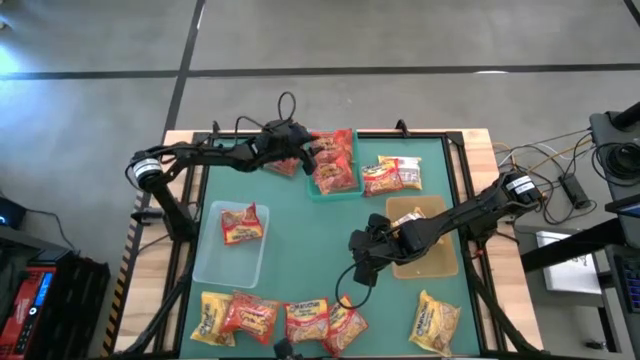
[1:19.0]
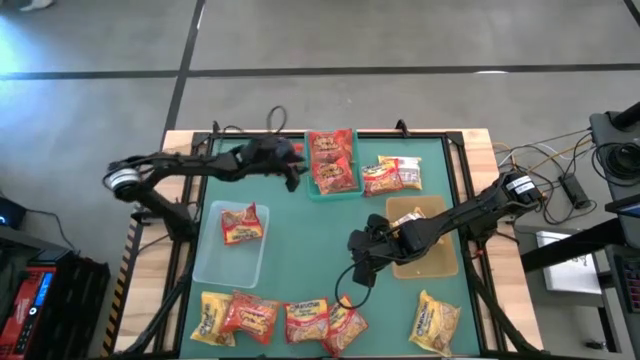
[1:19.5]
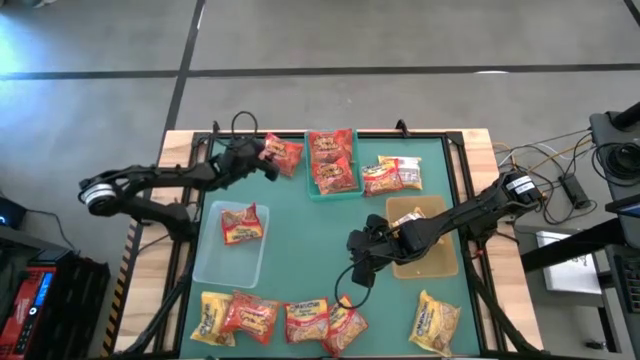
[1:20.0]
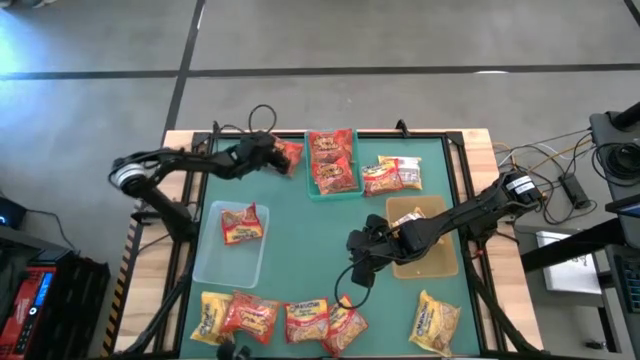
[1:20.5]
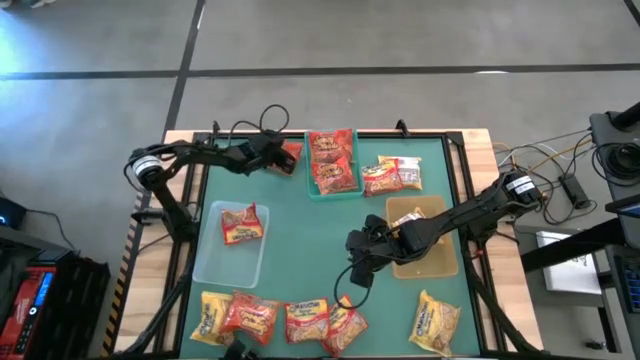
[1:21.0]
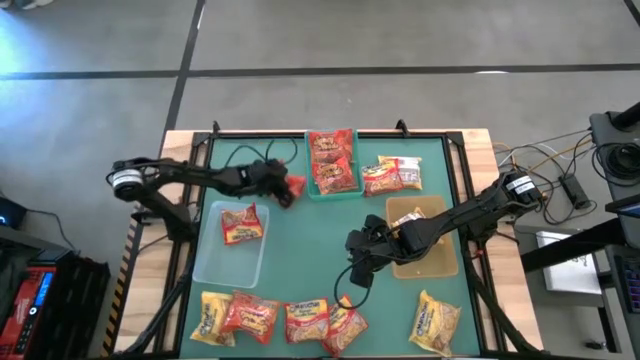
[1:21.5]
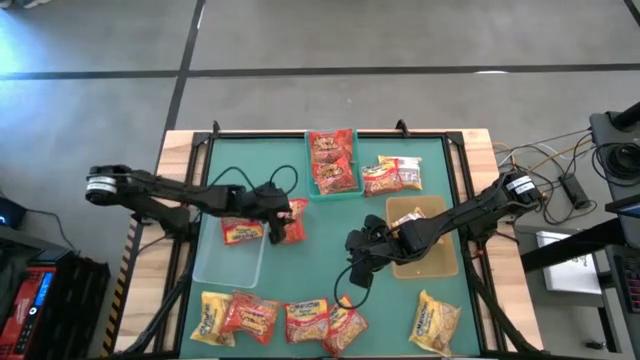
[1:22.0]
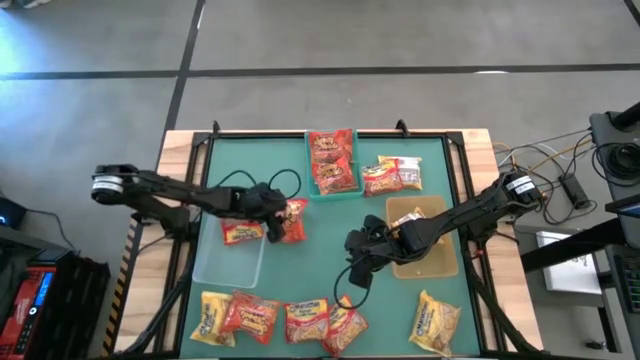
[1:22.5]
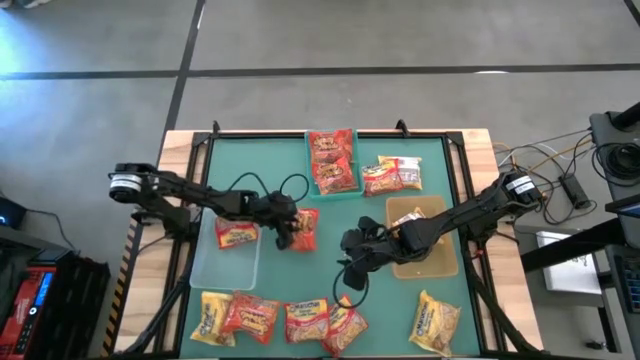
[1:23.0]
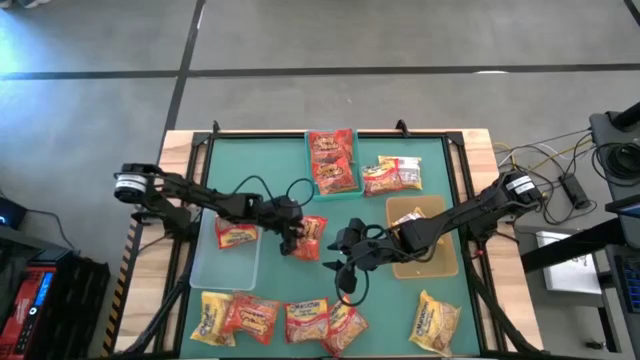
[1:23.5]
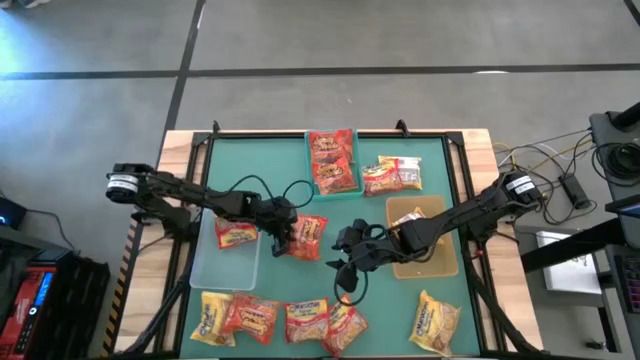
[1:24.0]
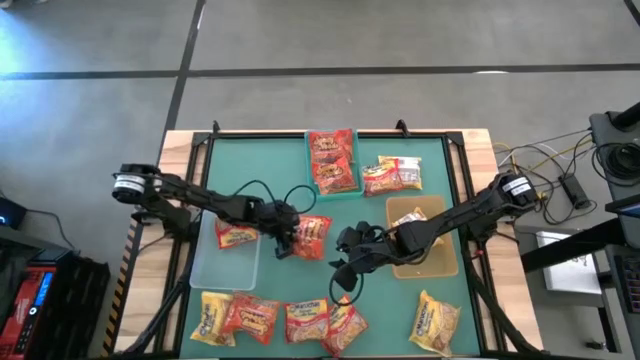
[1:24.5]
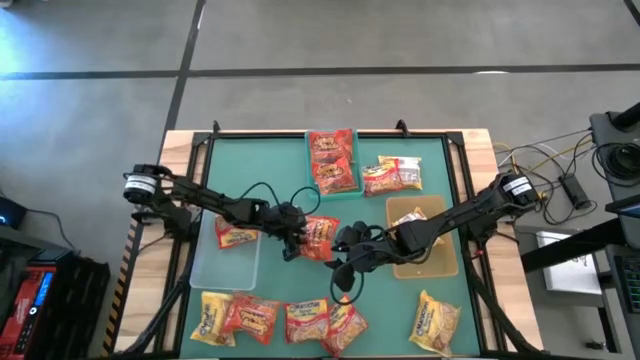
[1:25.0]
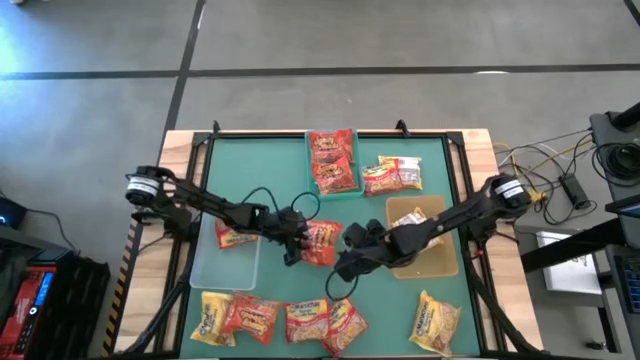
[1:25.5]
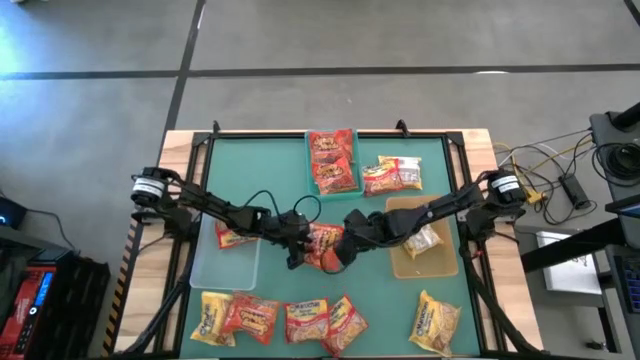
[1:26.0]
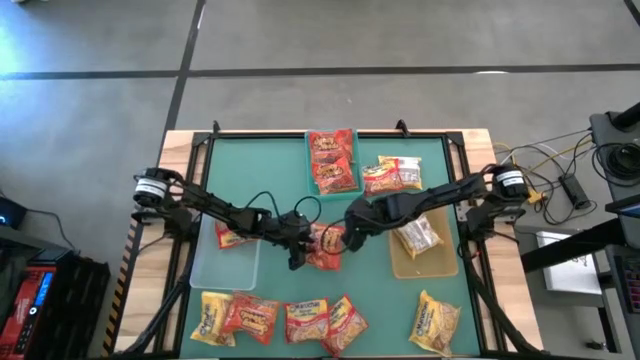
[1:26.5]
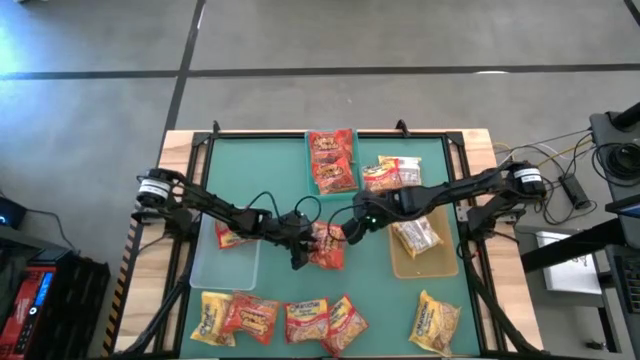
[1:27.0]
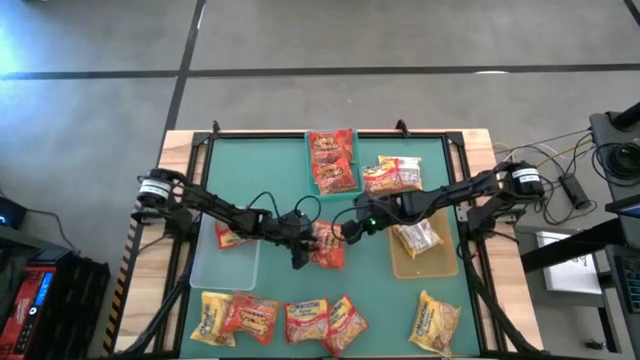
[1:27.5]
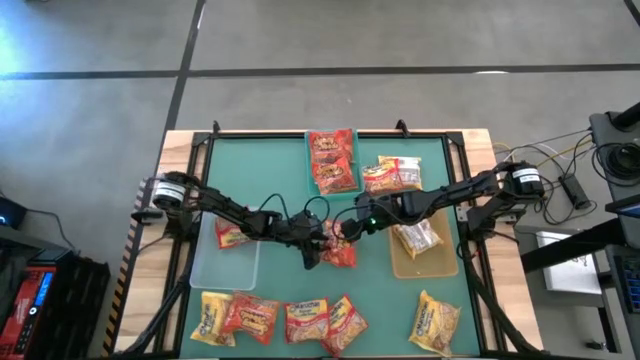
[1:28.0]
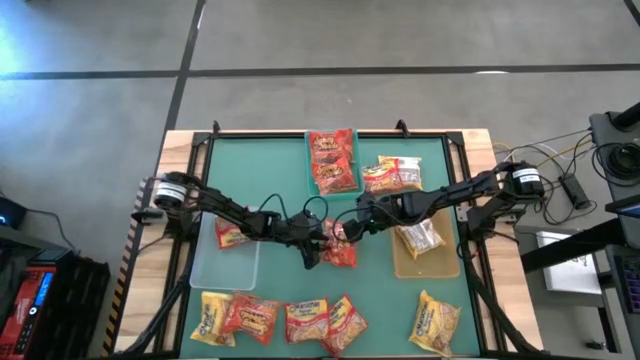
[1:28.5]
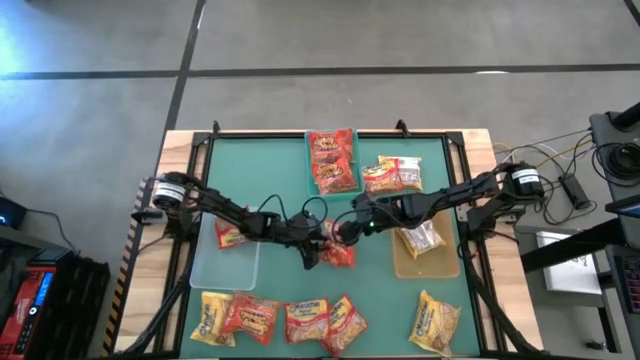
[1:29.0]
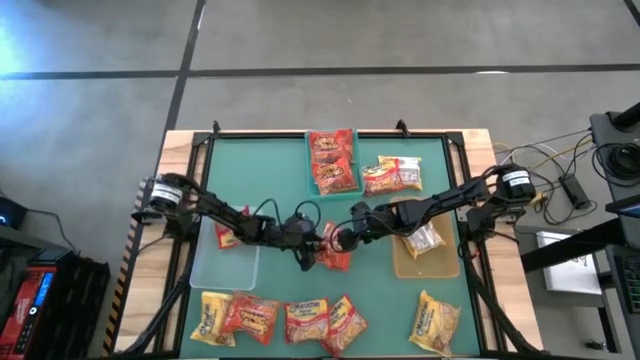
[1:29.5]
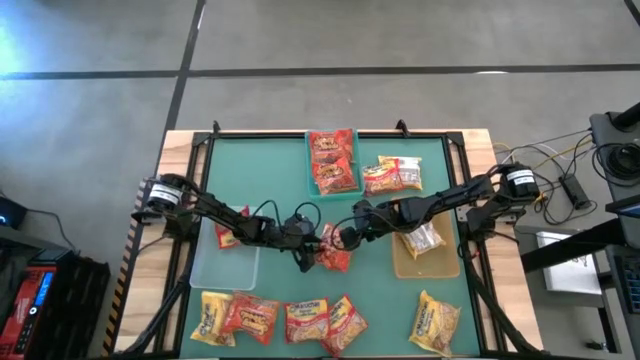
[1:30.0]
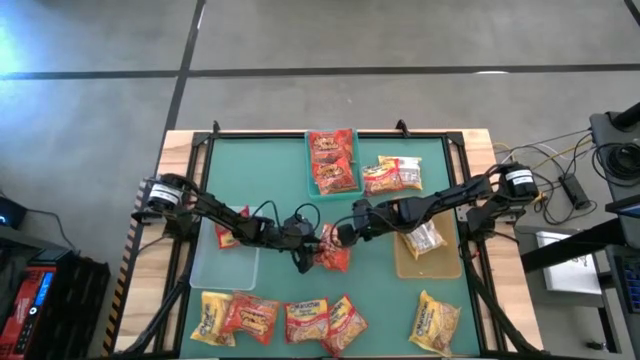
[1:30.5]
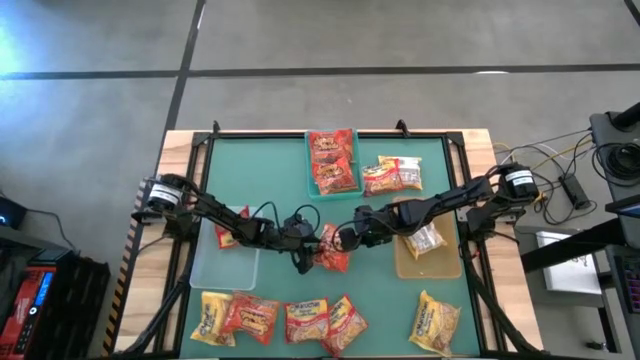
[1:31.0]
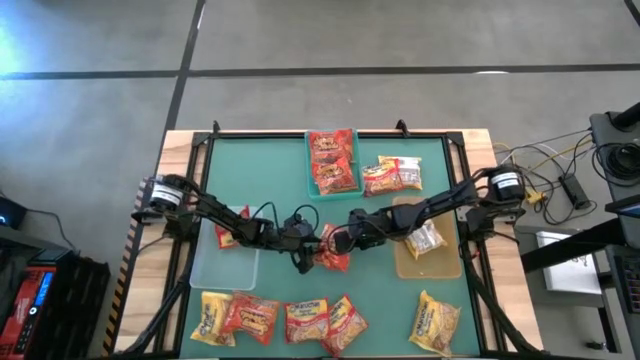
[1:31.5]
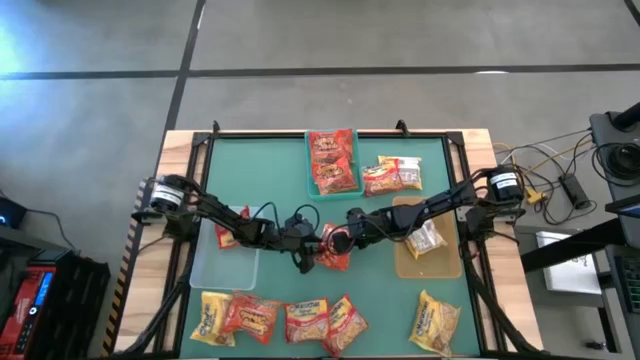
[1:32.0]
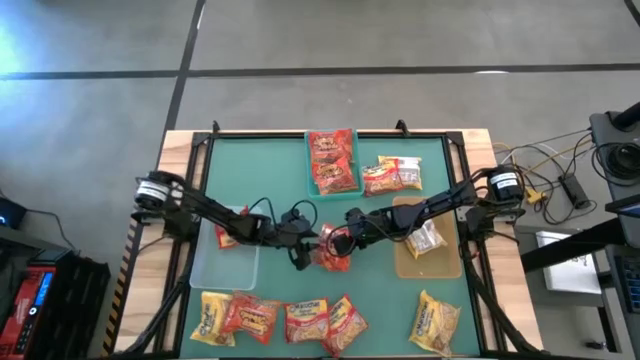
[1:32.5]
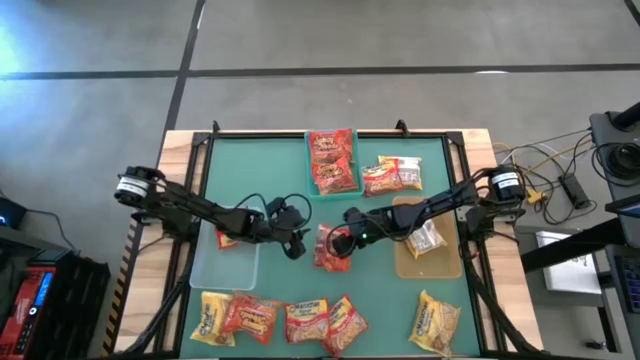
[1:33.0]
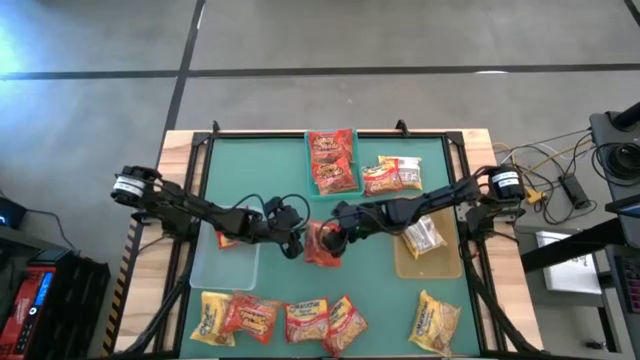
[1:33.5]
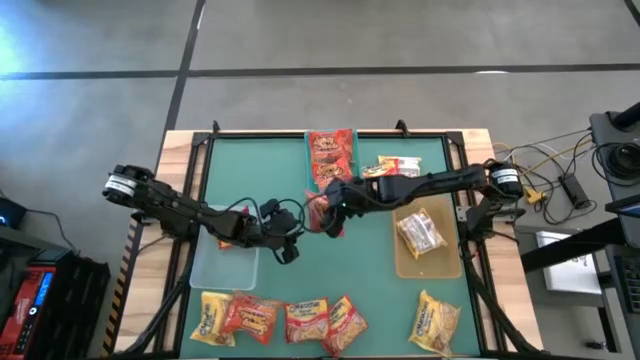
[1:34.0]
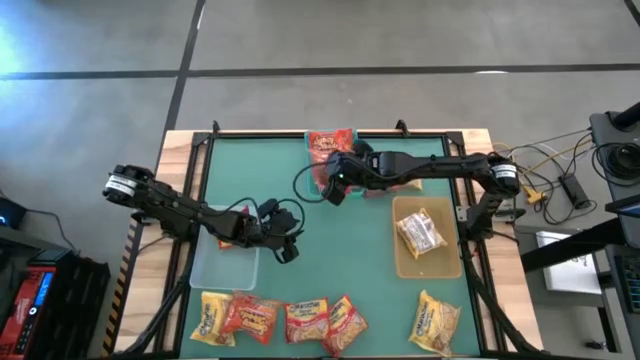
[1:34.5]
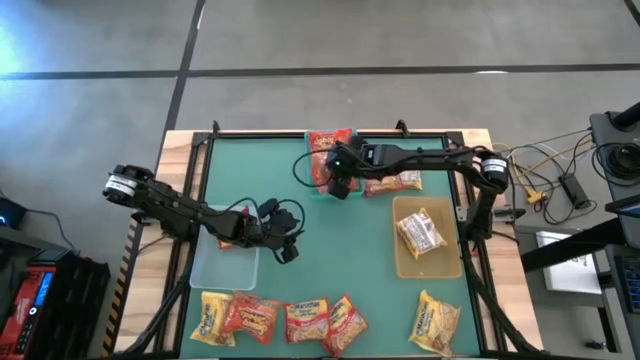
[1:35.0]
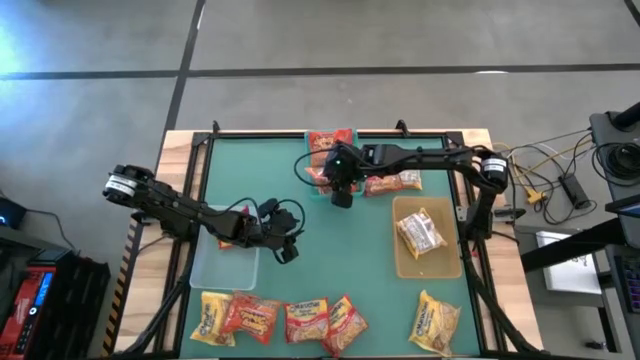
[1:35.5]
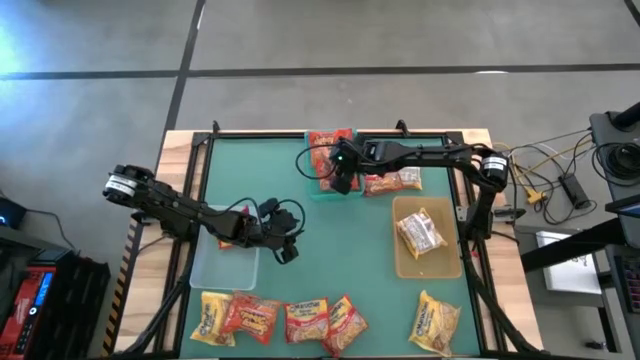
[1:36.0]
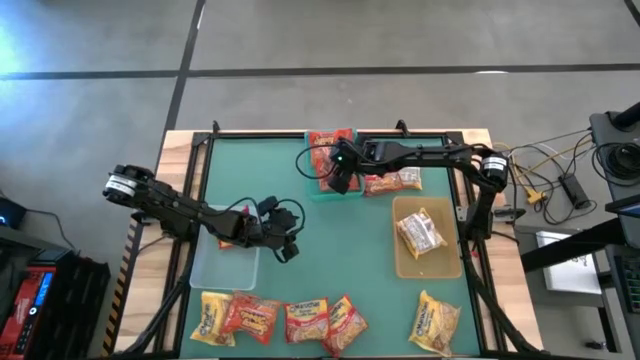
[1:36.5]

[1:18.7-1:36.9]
Task: Sort Maruchan noodles
Put the orange noodle pack into the blue bin

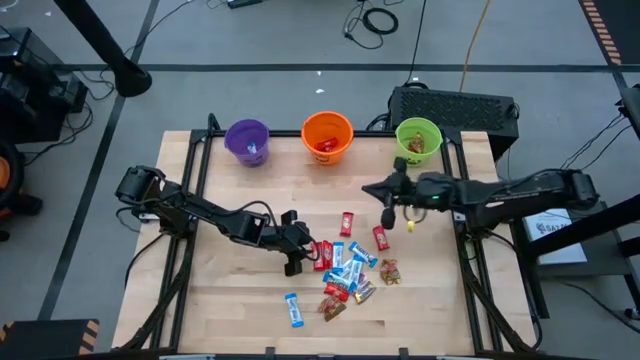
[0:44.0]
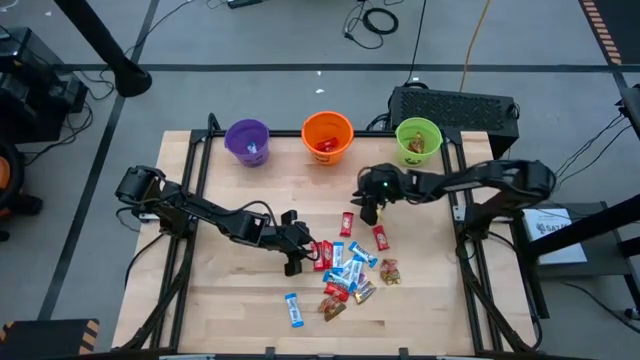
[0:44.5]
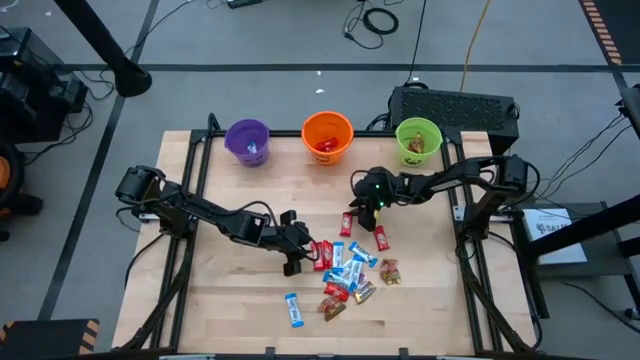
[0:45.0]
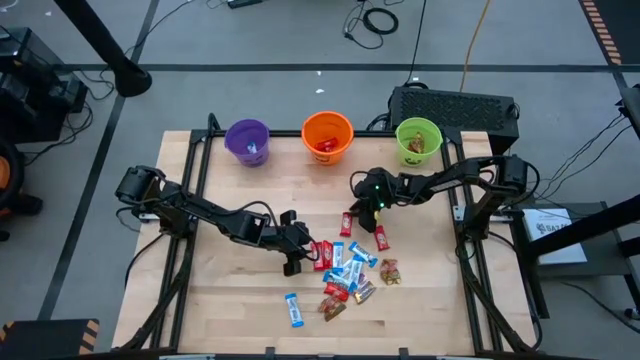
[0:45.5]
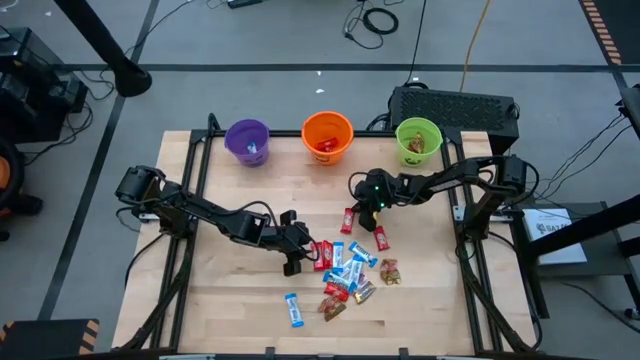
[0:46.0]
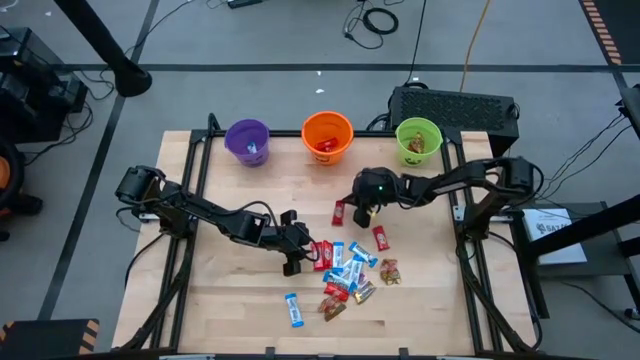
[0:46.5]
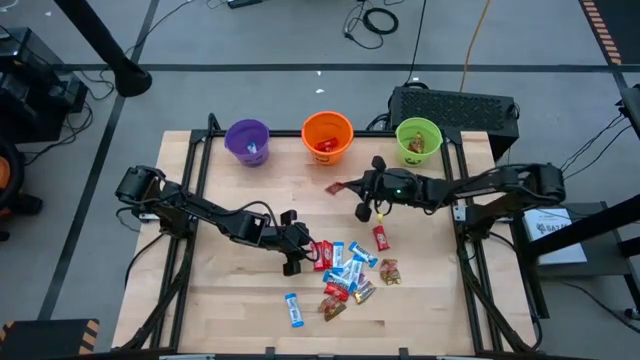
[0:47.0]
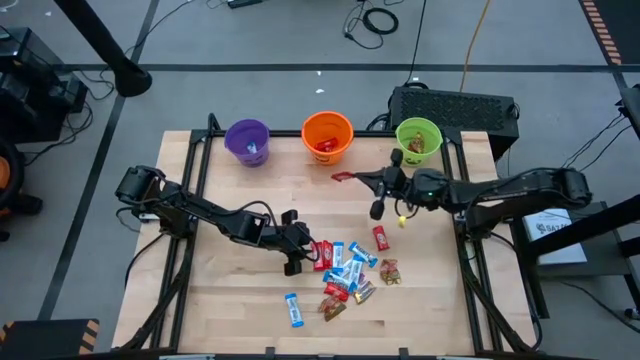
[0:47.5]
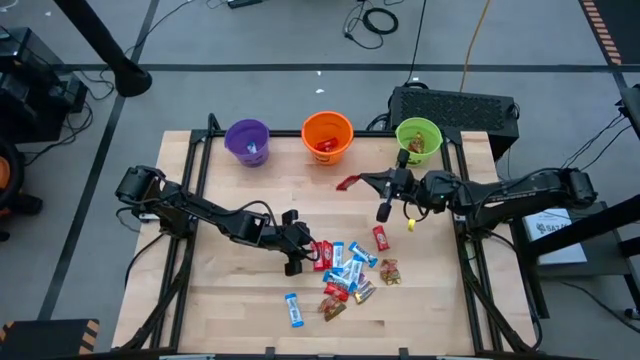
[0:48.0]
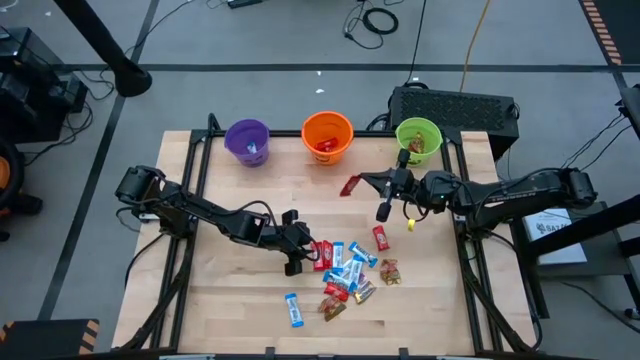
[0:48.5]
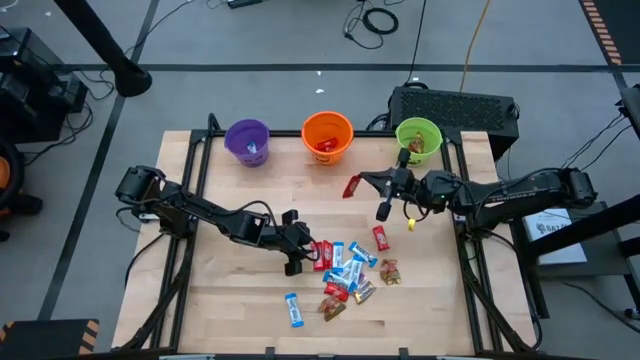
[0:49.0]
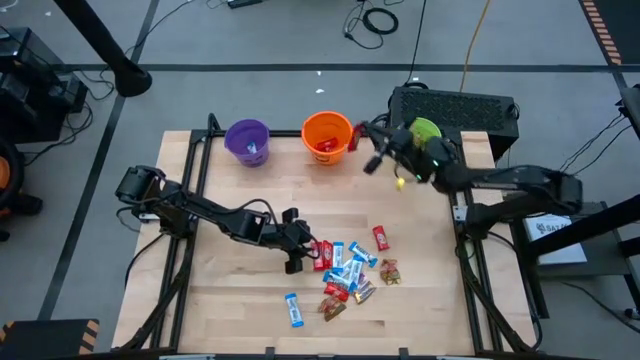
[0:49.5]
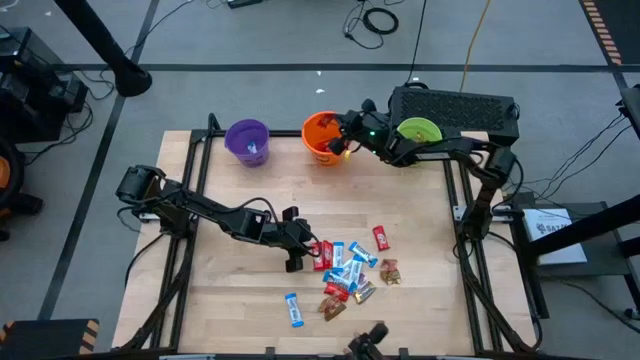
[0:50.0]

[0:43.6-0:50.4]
Task: Sort candy by brand, put in halloween buckets
Put the red chocolate into the orange bucket
